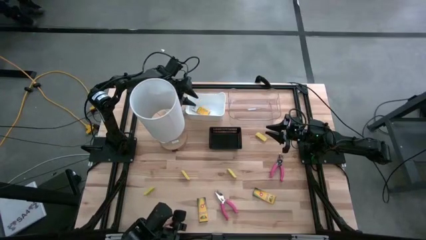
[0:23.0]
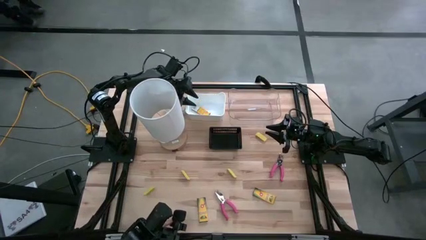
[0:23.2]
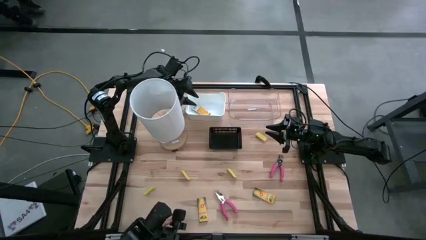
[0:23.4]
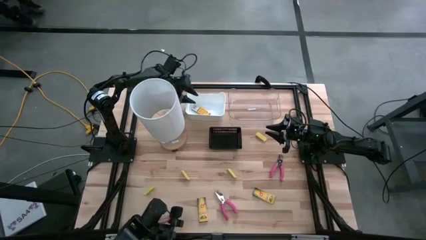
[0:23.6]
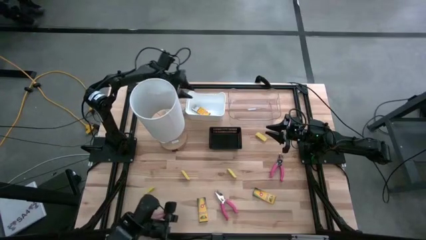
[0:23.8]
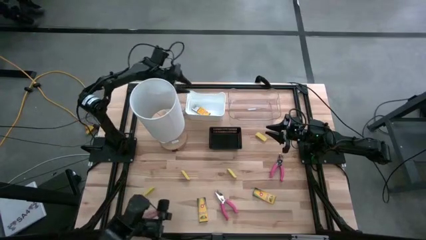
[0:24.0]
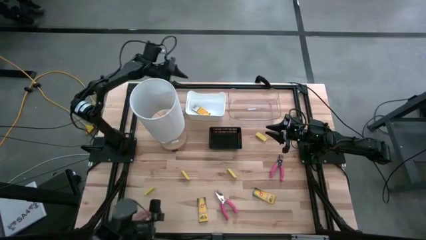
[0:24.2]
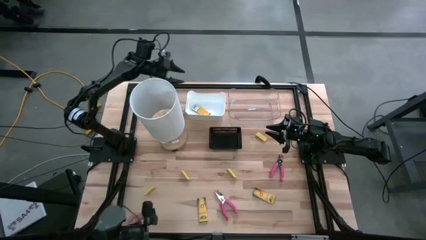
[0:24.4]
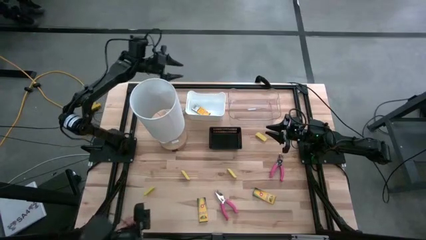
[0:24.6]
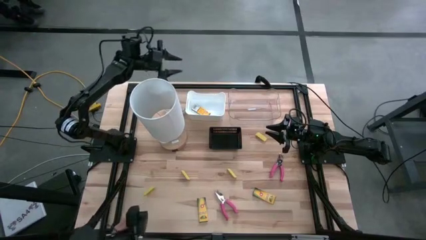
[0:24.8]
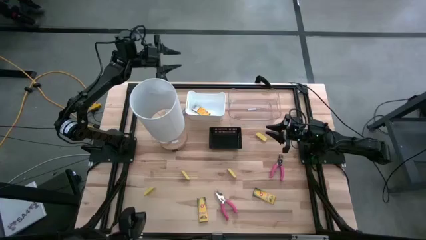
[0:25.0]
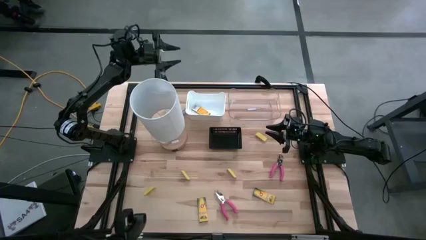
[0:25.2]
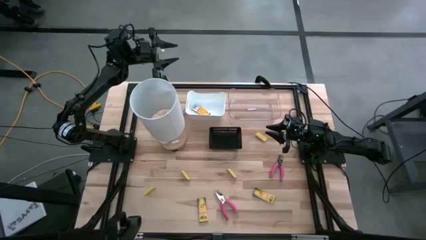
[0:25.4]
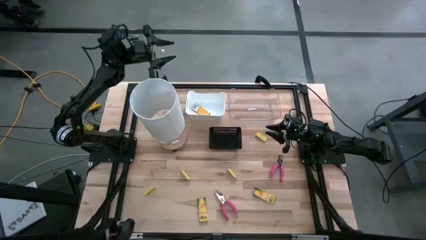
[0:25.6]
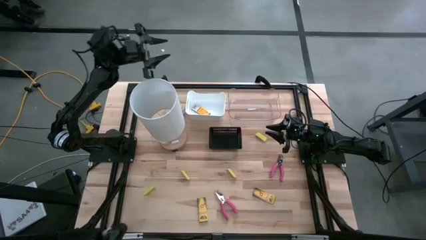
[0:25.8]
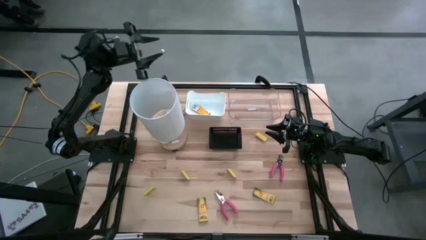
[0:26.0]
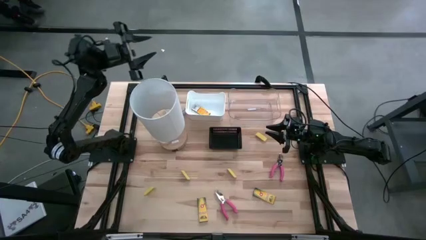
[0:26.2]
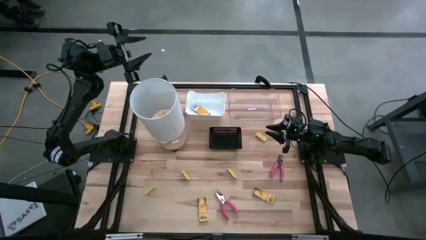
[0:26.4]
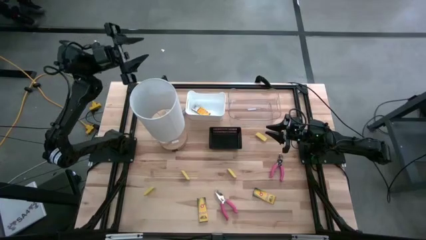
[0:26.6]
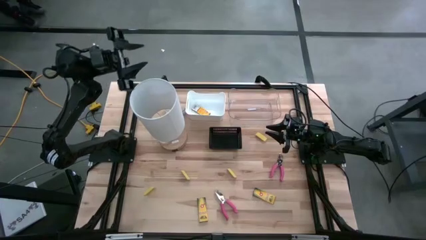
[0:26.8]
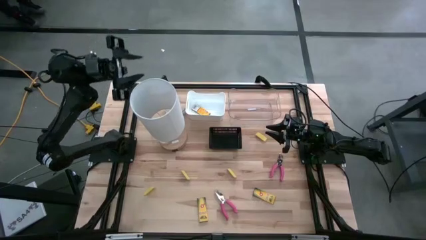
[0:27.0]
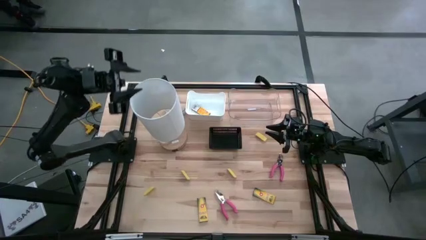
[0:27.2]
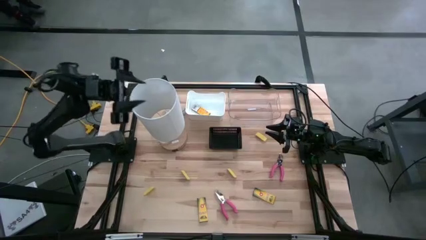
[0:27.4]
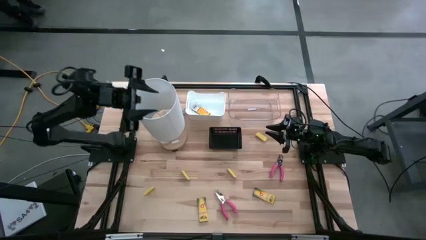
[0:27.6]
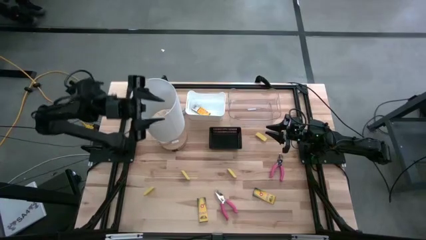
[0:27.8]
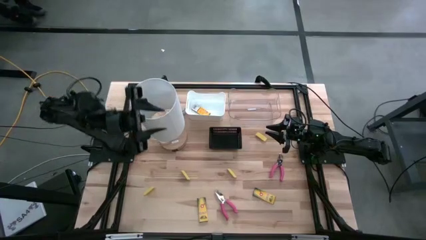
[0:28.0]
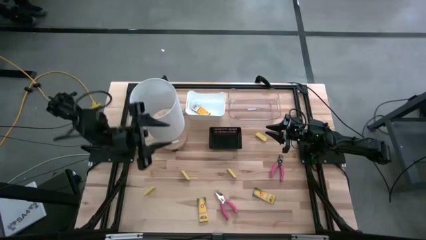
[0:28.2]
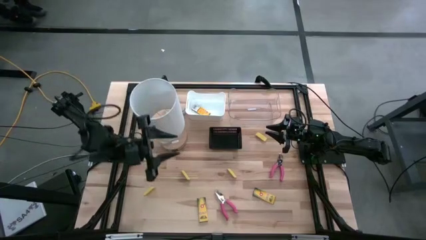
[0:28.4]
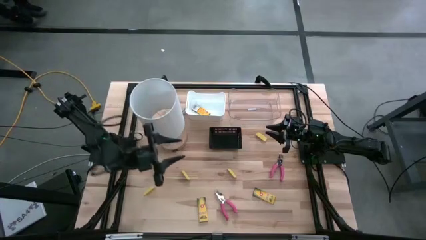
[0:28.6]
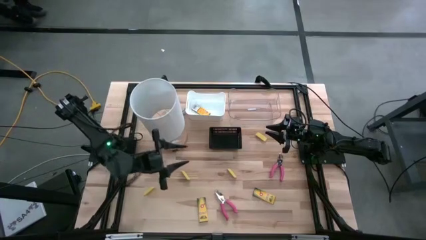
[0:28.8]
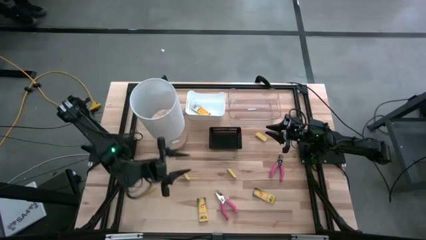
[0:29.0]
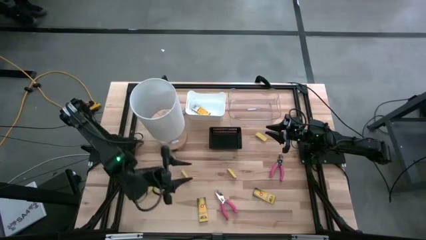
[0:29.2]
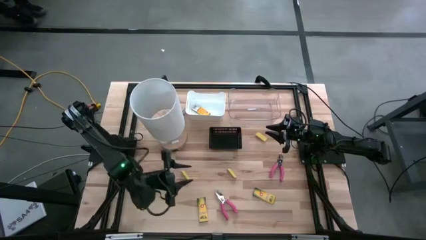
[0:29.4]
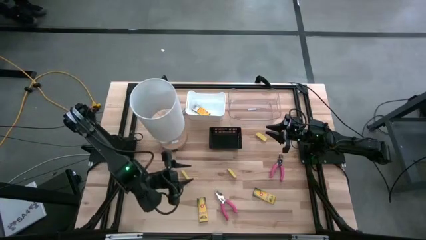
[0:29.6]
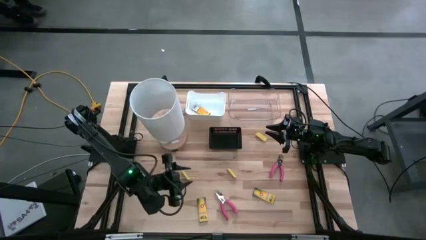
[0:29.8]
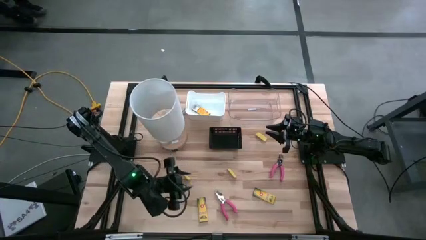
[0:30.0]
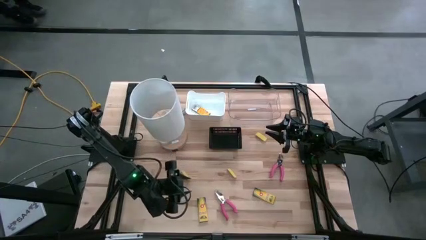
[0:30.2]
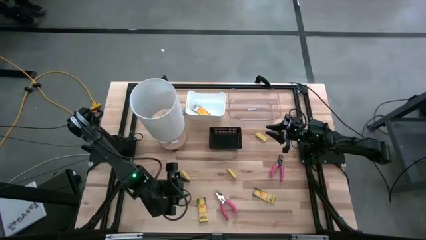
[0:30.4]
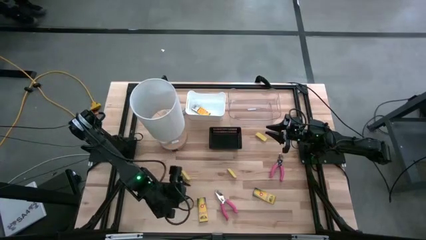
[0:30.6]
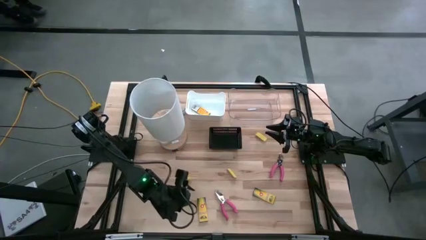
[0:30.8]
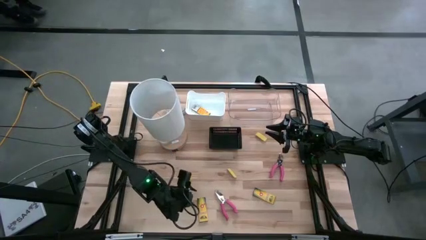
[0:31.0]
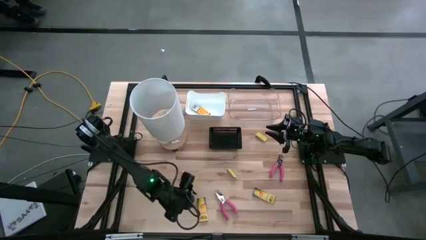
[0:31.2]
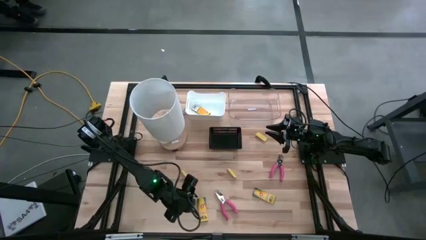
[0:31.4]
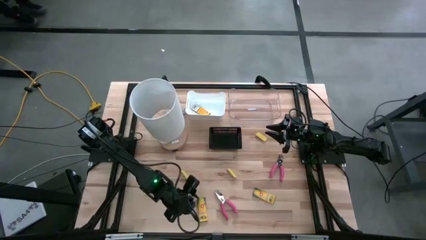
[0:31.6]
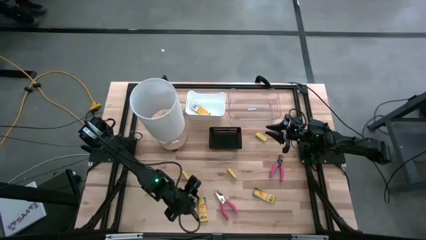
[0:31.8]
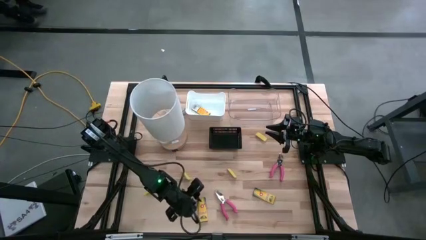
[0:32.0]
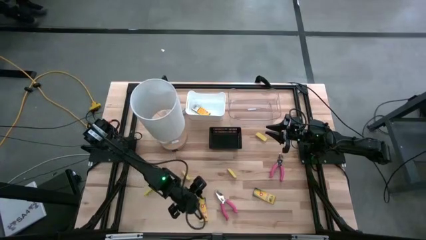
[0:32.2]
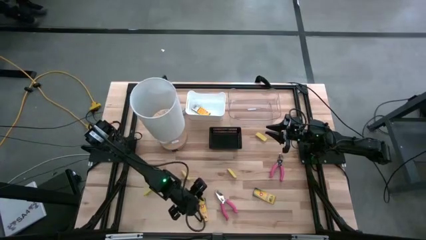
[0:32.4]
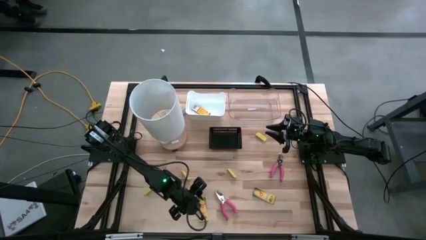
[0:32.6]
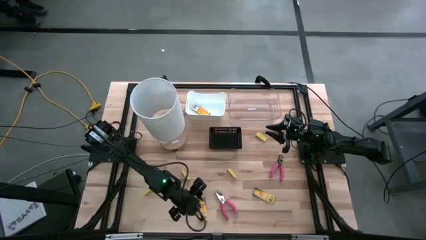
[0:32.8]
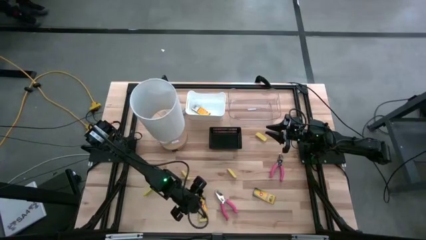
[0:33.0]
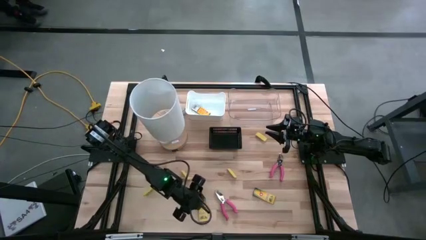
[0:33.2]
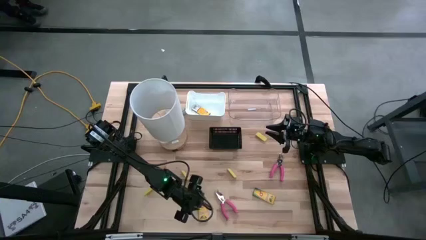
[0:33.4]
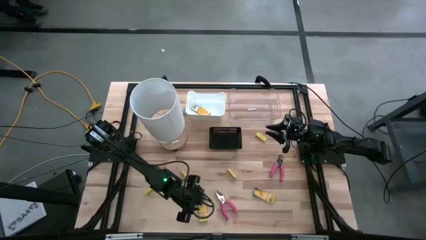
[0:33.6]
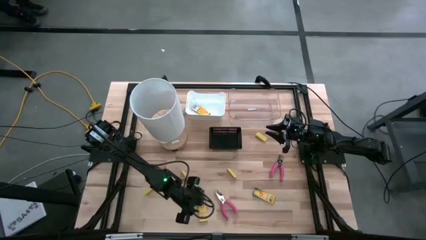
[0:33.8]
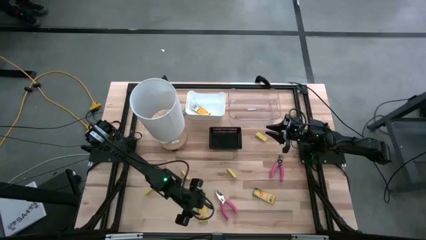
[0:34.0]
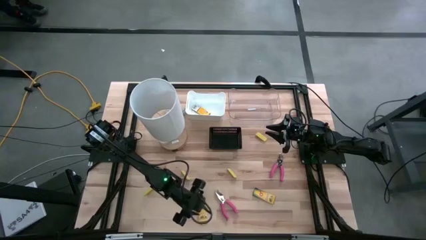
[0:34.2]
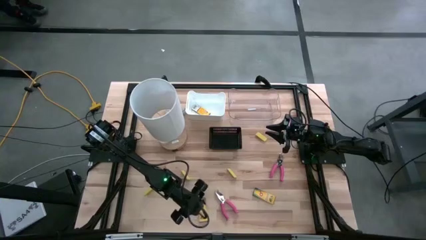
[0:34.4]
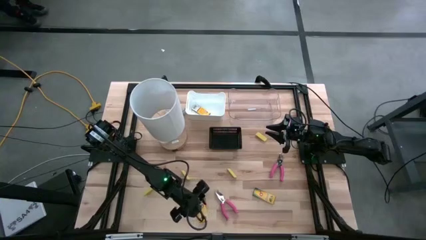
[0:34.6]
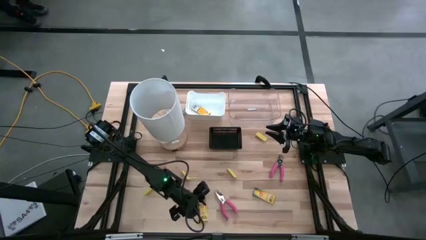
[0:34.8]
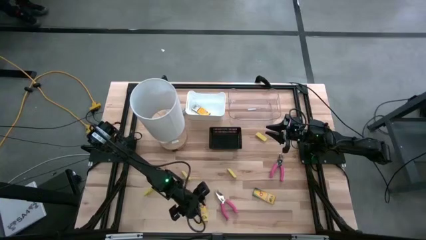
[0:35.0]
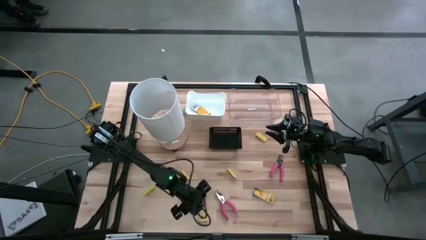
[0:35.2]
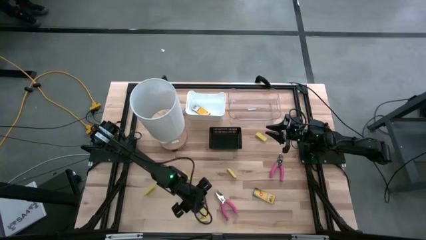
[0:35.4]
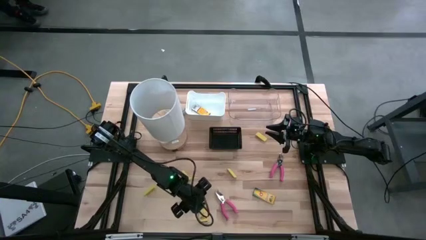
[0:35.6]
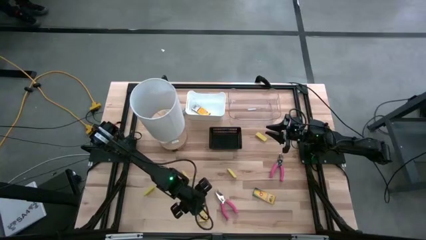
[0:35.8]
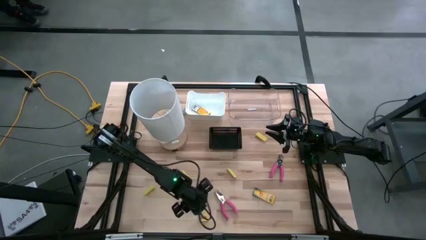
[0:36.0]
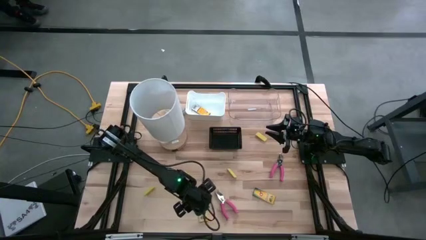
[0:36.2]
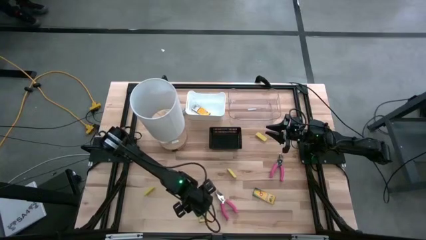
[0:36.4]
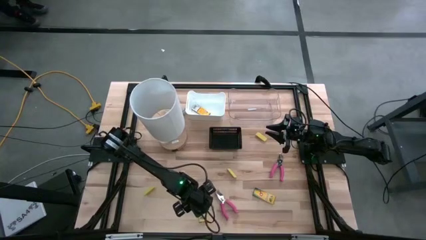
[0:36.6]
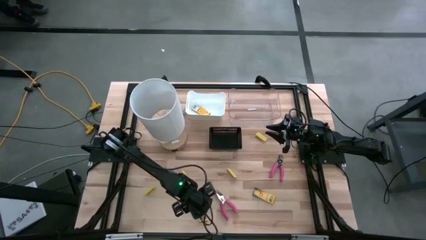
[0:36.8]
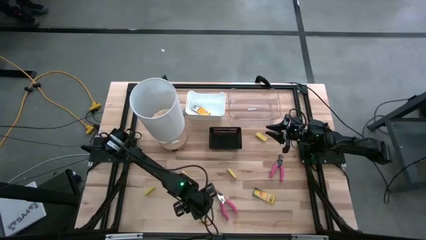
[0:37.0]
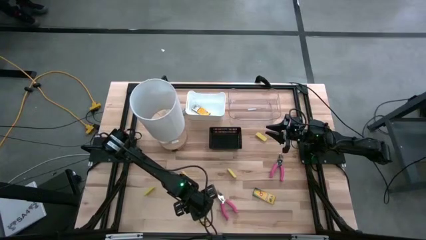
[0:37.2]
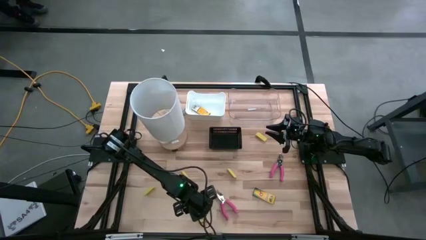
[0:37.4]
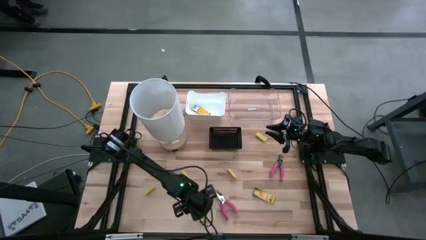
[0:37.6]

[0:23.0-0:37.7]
Task: Pick & Place School Supplies
Put the yellow crayon box into the white bin
